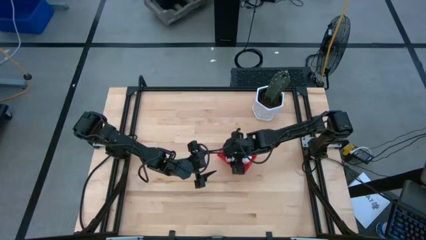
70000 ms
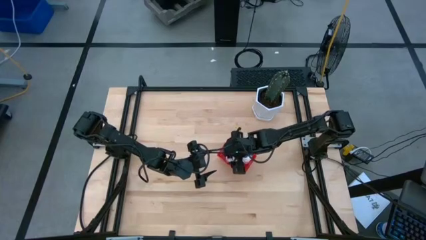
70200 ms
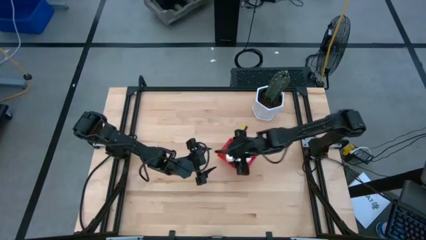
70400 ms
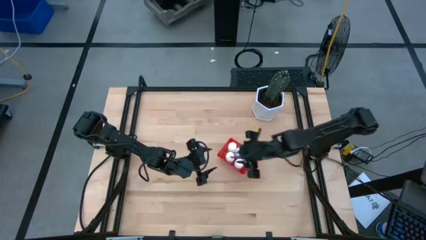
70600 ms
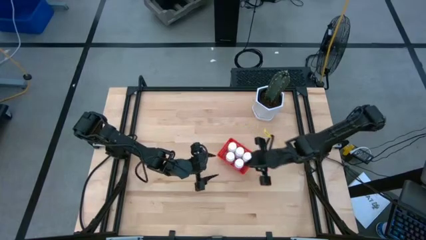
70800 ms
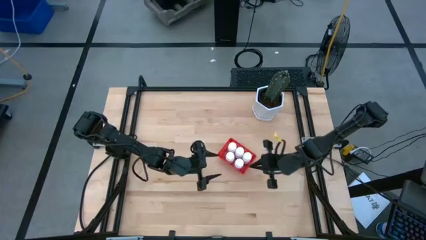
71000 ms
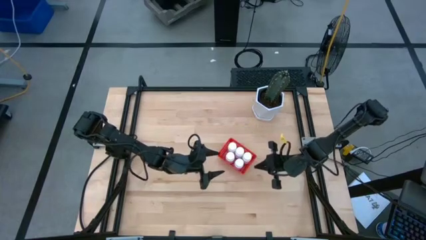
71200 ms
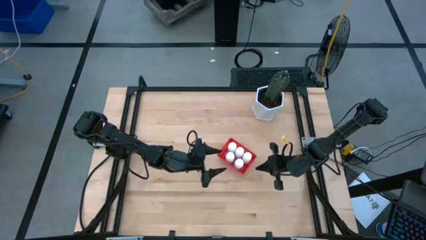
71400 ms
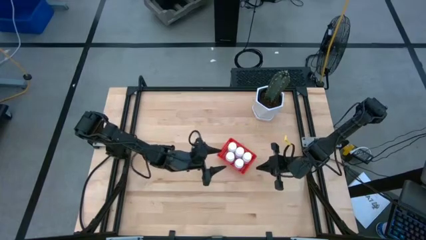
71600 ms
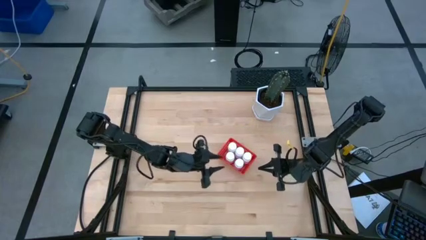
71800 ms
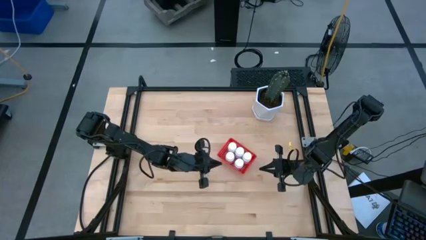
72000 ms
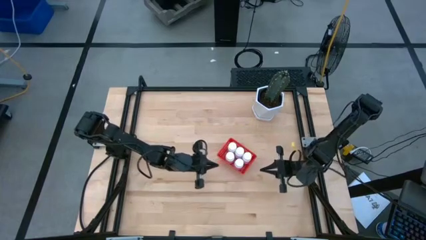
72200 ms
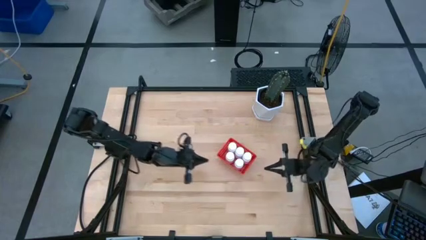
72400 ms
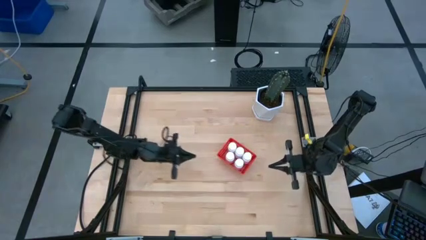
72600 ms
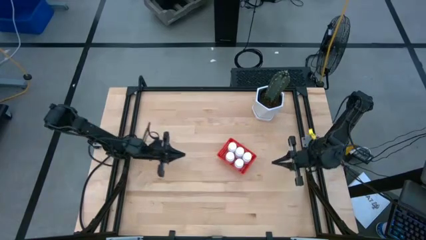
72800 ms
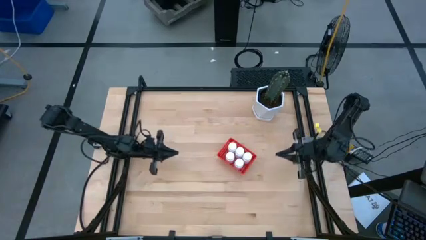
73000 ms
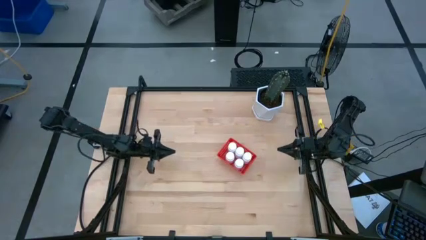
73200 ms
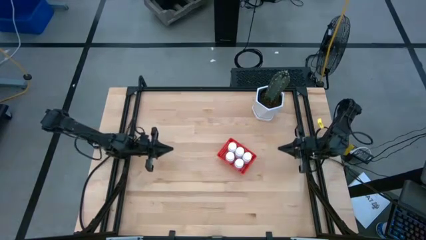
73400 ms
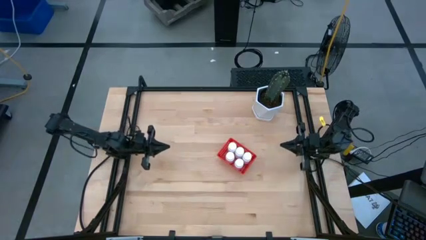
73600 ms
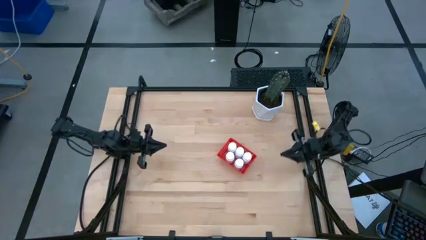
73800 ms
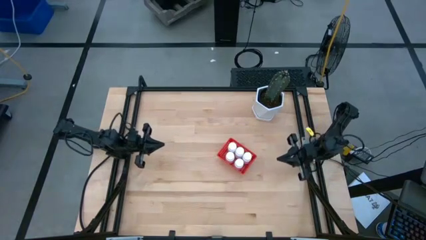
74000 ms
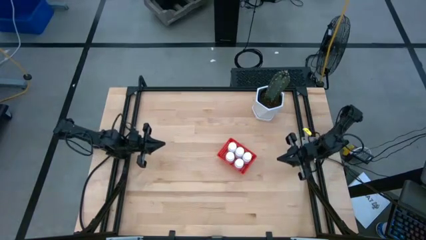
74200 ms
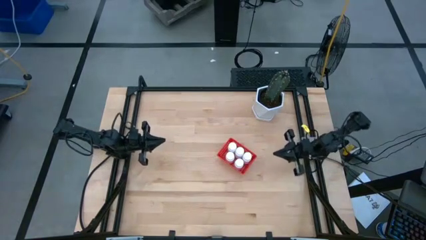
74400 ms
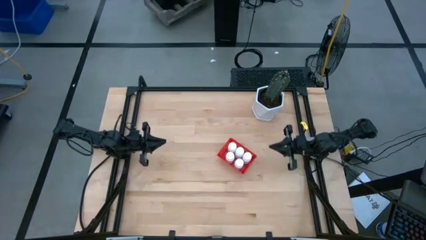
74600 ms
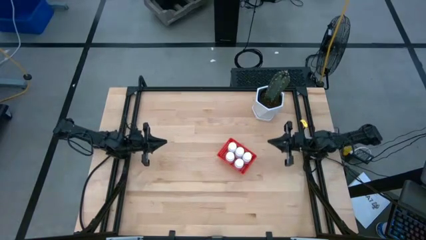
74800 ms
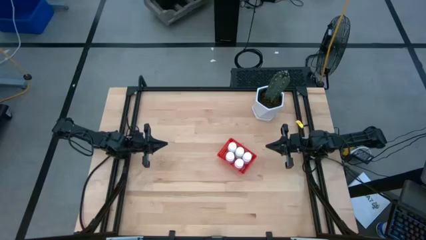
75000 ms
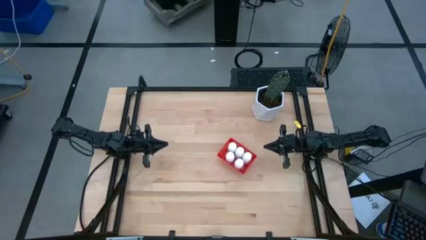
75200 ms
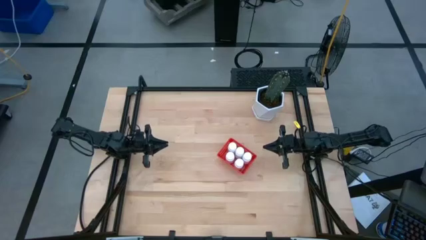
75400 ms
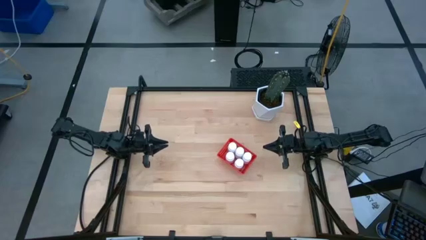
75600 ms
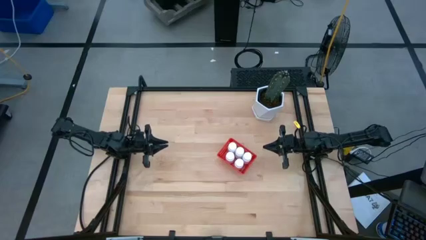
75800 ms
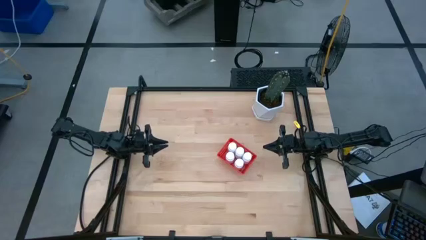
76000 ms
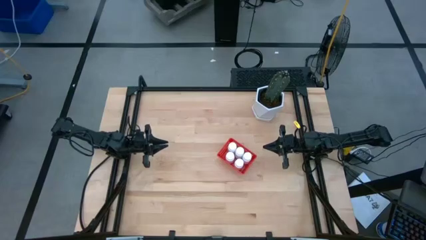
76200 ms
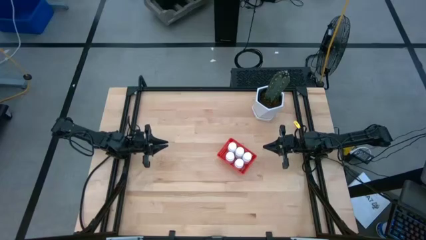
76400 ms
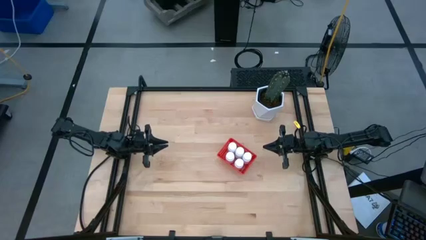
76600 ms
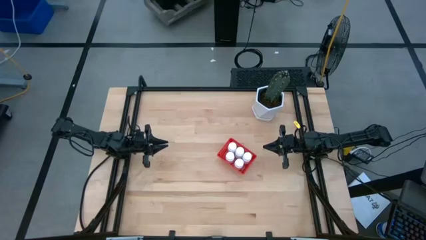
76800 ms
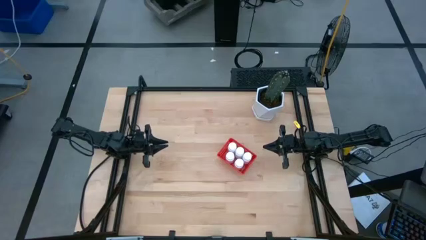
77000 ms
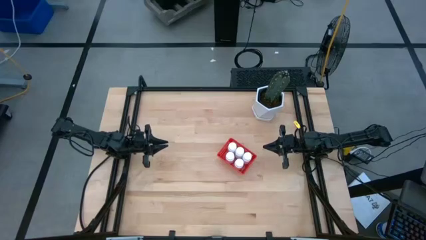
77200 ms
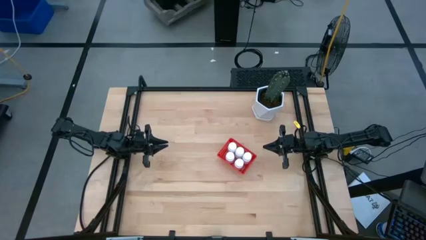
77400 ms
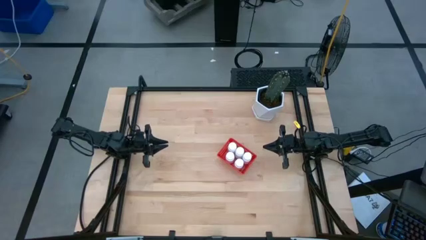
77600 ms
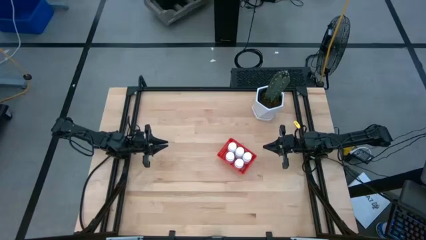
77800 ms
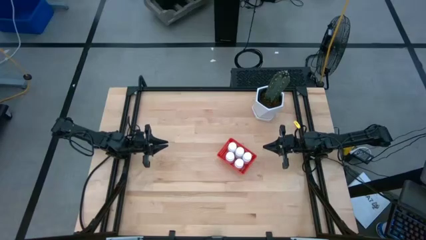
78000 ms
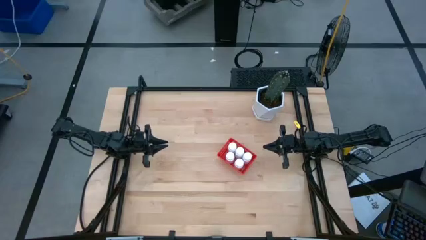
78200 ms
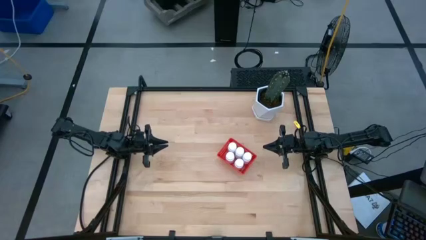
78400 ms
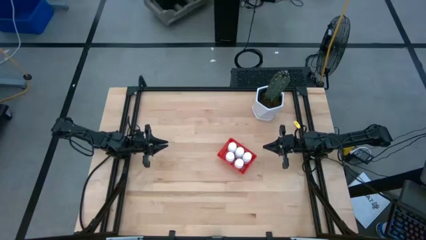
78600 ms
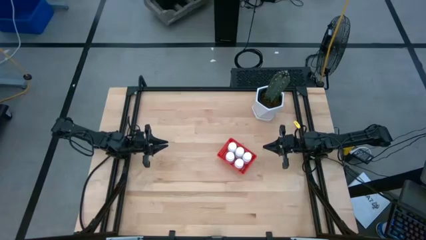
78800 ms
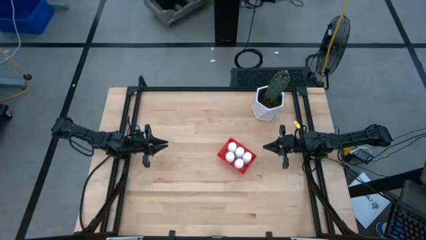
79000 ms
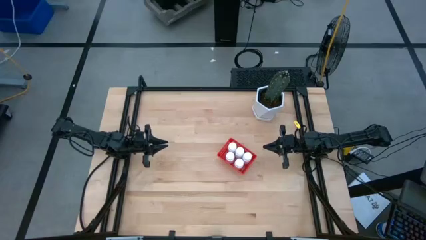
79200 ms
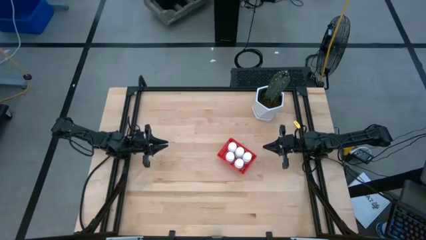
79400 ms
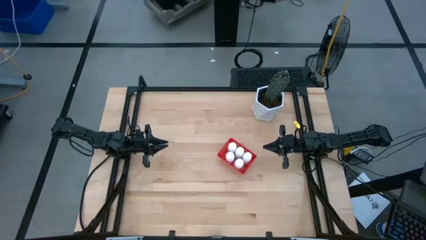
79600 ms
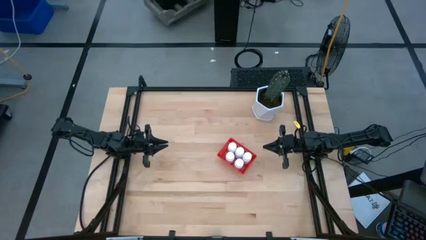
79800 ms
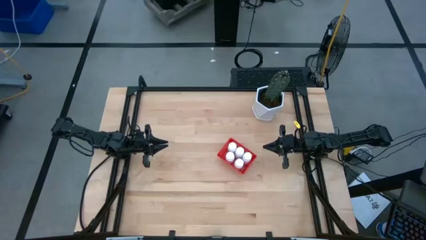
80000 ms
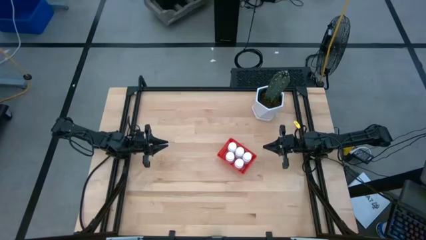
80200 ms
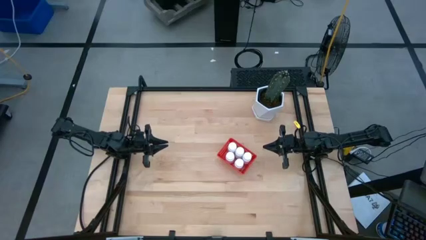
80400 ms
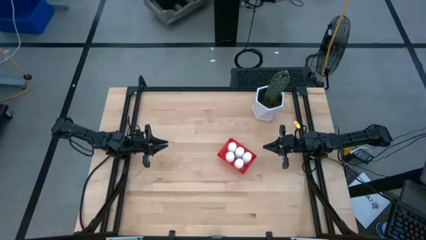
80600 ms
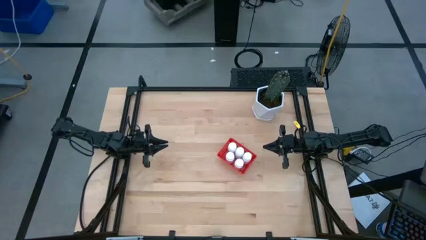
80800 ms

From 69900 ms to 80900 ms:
Task: Pick and place pill bottles into a basket
Return to Home Position

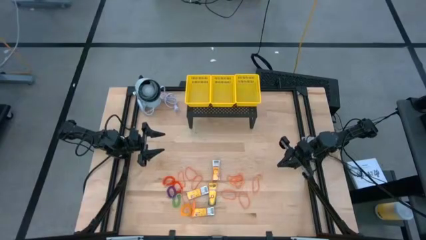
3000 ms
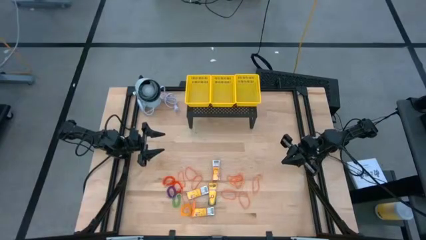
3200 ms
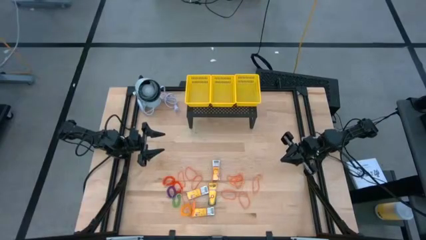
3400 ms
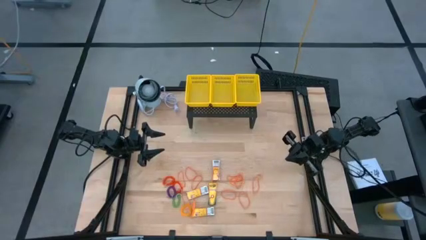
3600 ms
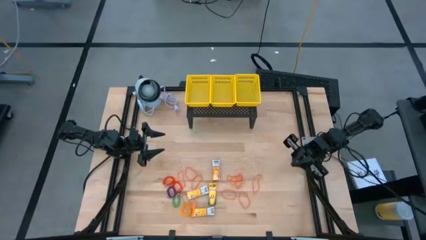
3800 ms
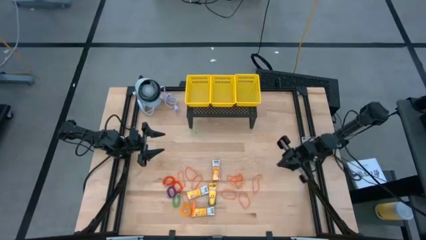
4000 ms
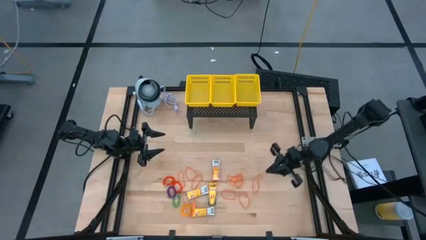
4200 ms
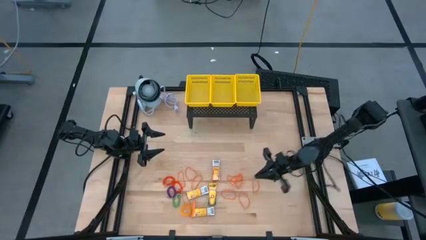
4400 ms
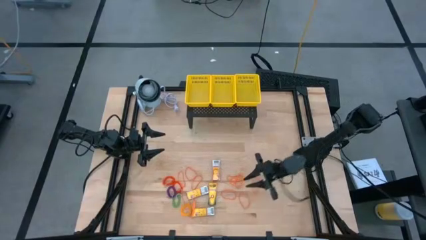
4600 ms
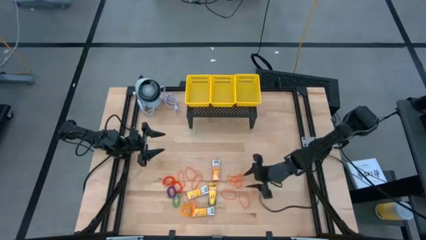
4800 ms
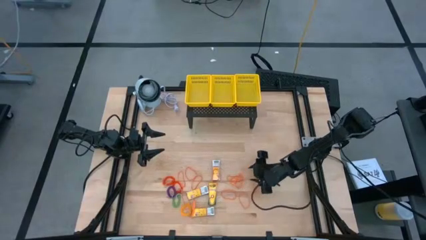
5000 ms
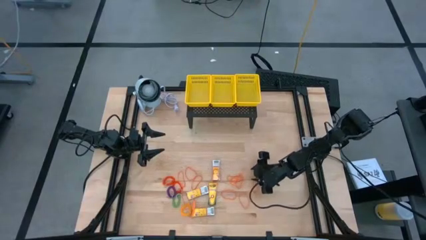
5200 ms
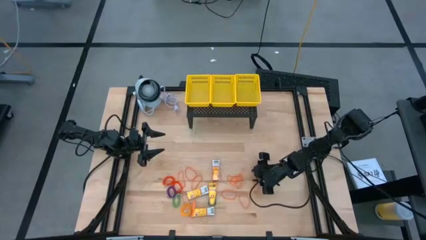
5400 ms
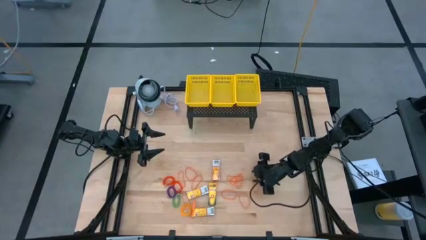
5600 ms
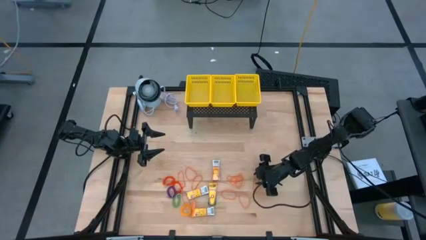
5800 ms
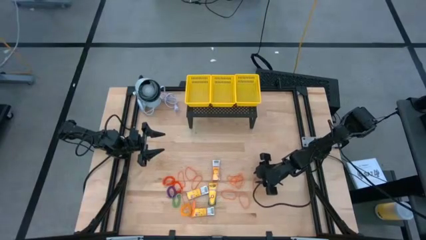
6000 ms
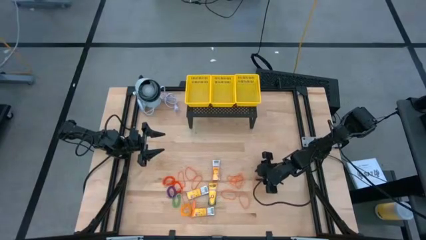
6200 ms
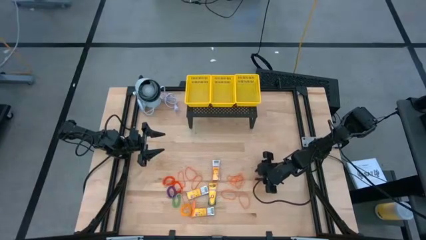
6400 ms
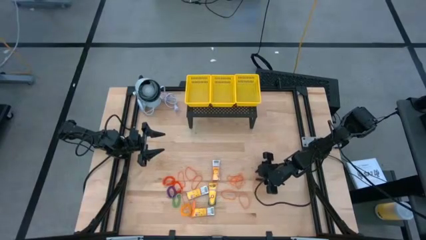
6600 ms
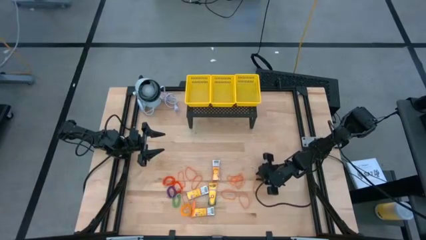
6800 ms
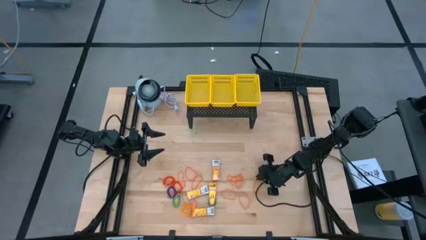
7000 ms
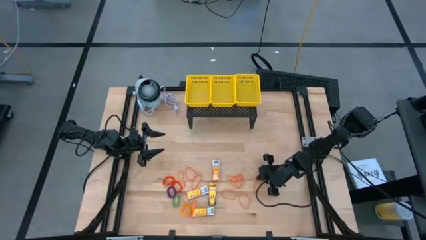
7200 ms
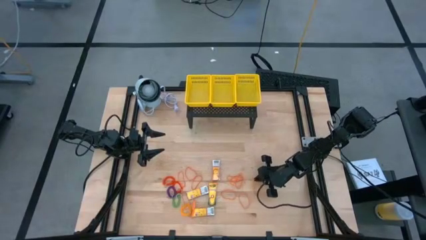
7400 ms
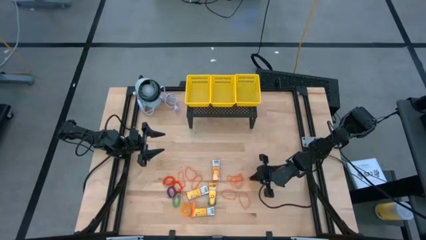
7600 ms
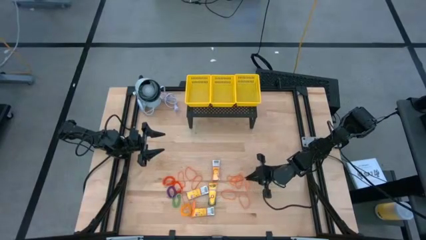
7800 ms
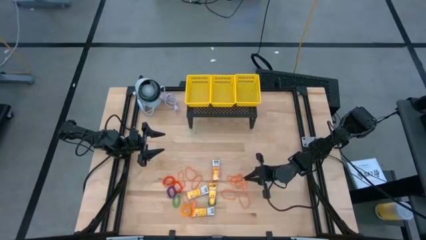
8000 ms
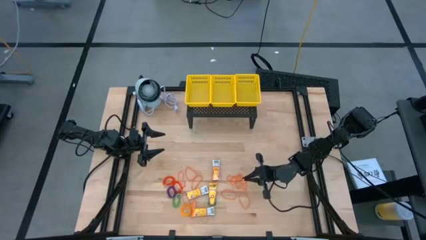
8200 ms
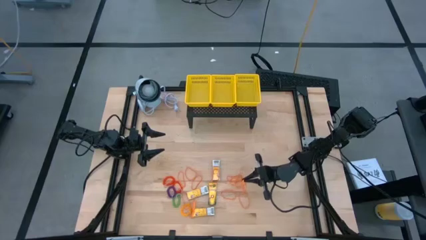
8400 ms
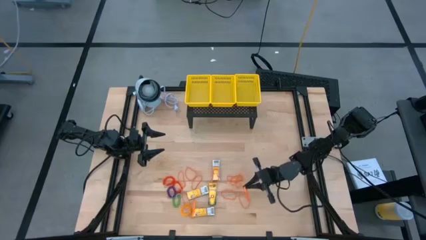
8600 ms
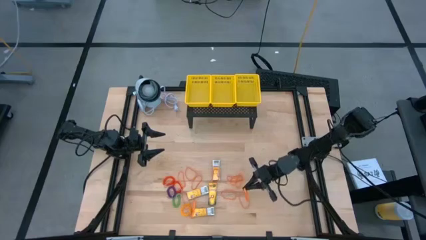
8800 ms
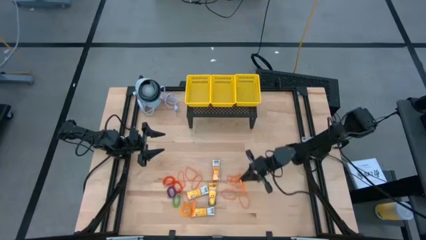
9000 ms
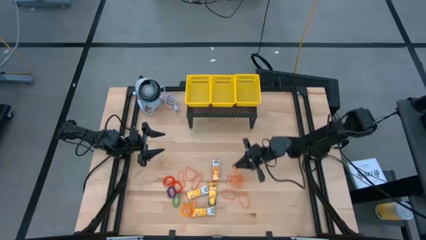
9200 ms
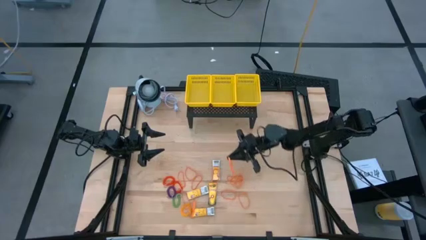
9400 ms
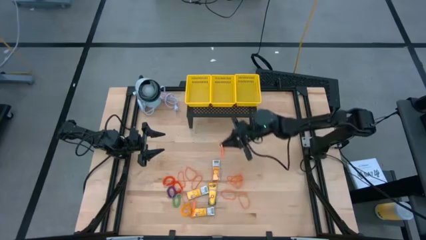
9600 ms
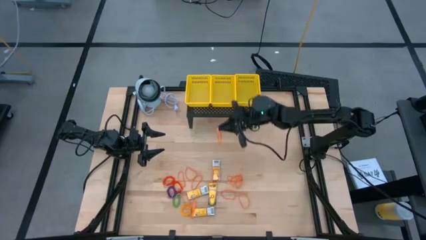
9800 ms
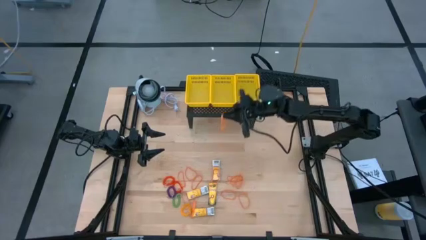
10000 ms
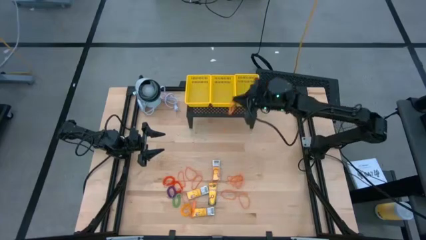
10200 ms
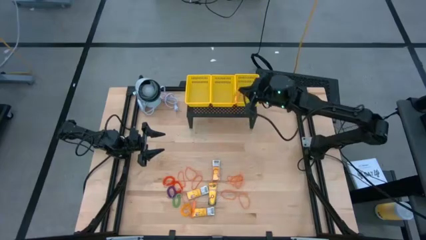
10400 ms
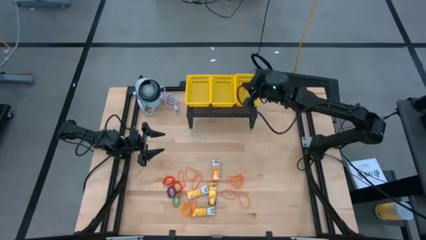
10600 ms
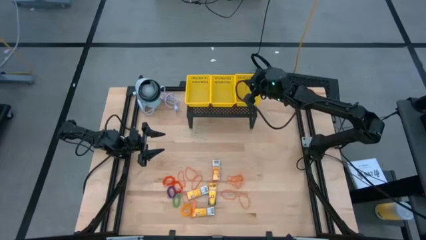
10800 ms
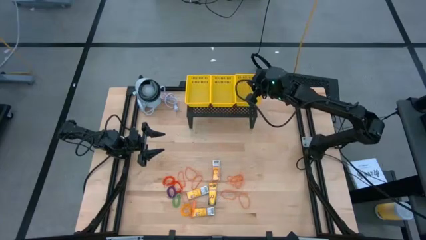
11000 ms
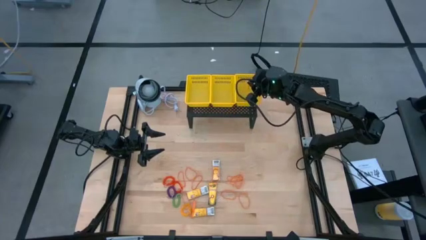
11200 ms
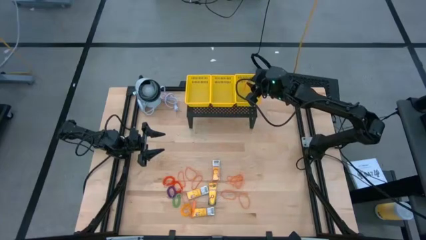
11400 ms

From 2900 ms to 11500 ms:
Task: Pick & Place Office Desk Supplies
Put the orange rubber band into the right yellow bin on the shelf
